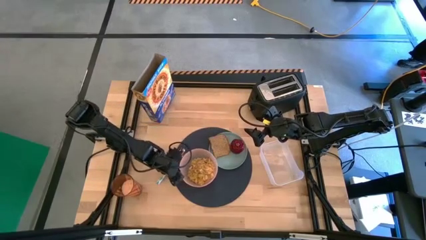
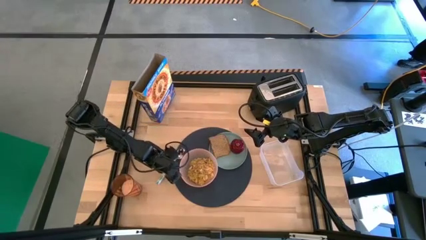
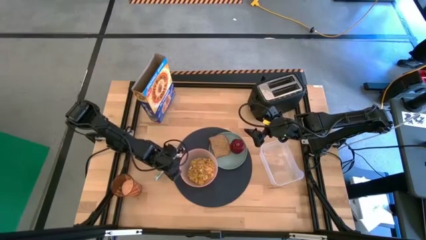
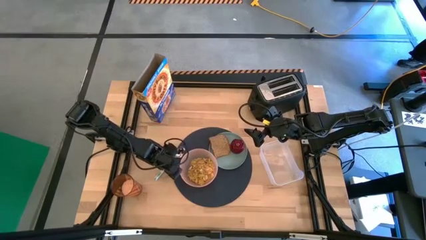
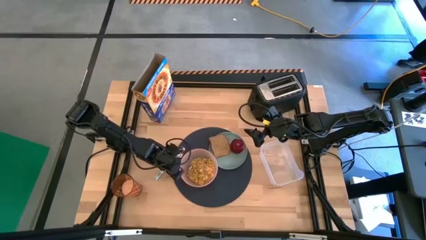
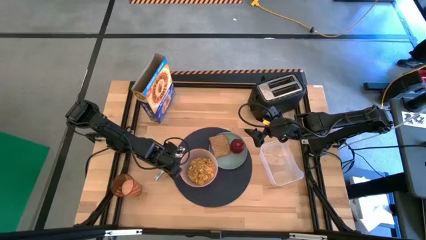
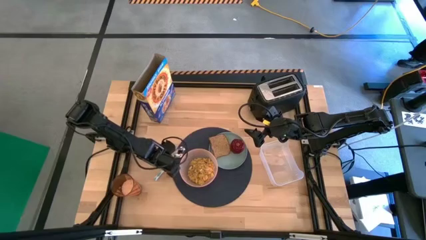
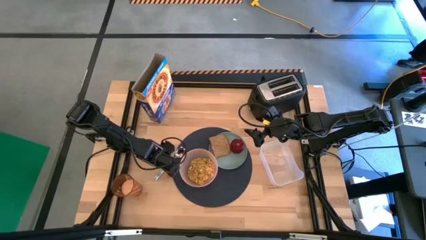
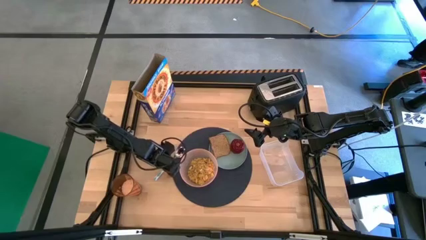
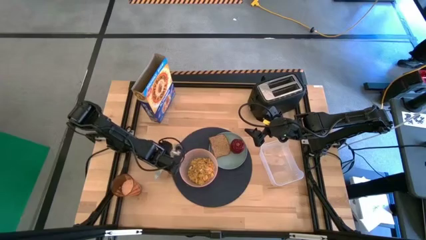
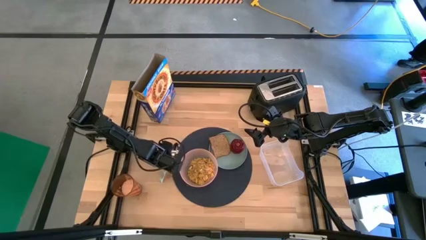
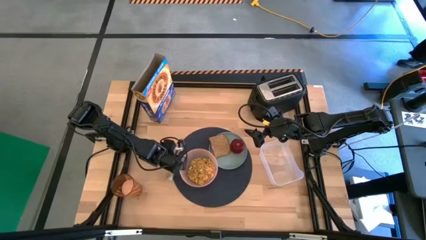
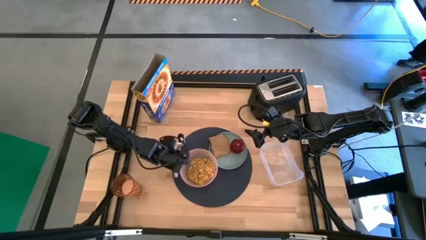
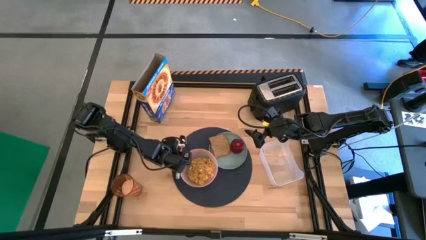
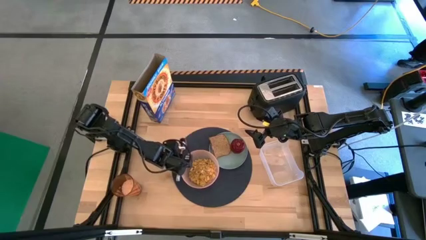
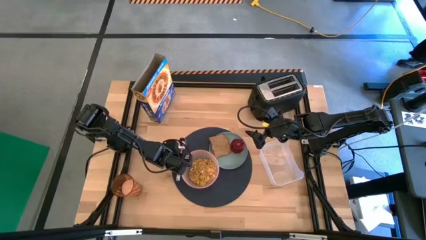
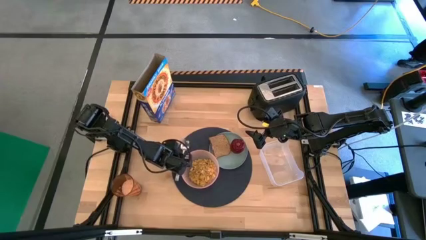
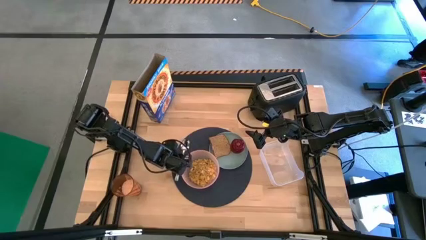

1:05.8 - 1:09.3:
Task: Arrange a breakfast setting
Adjust the green spoon on the blue table mat

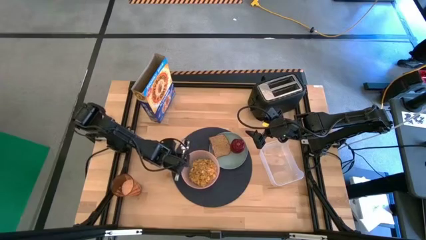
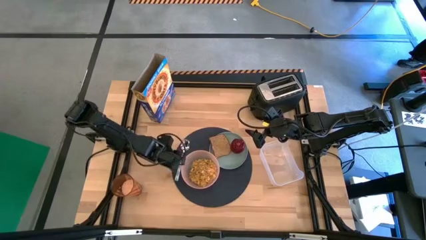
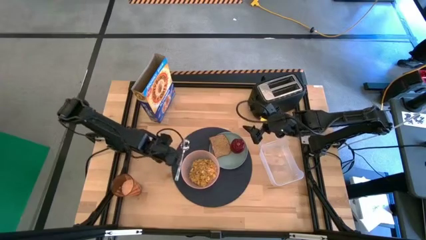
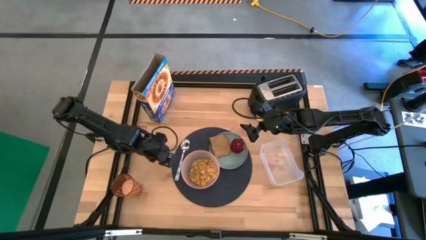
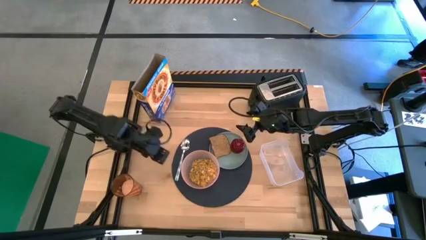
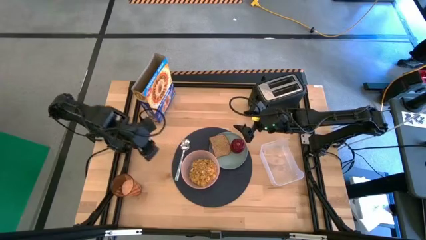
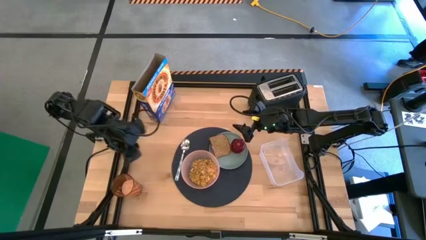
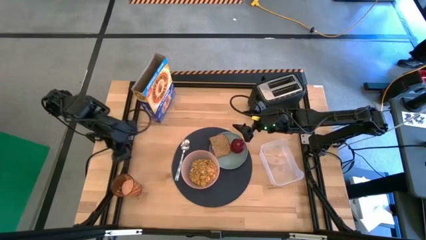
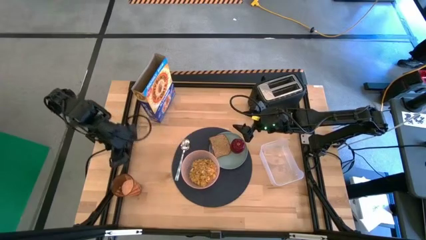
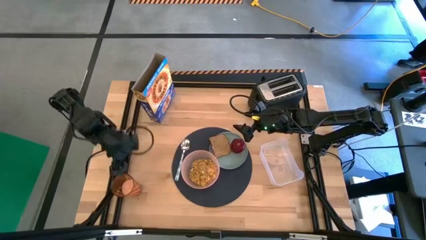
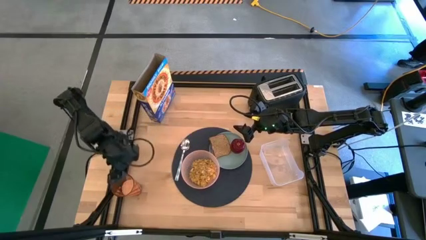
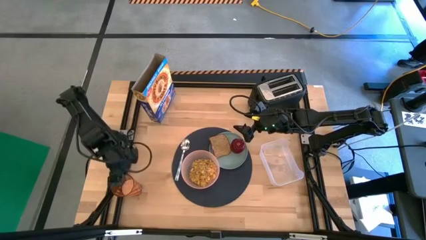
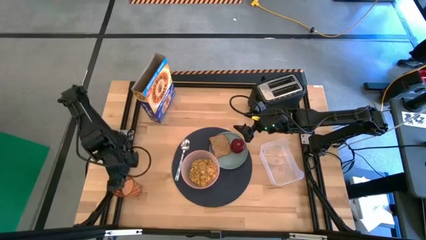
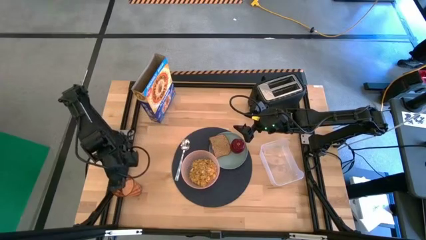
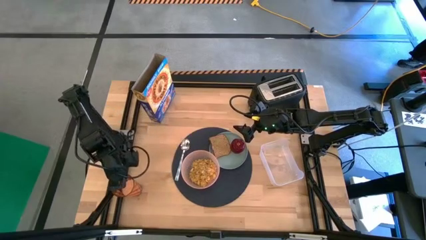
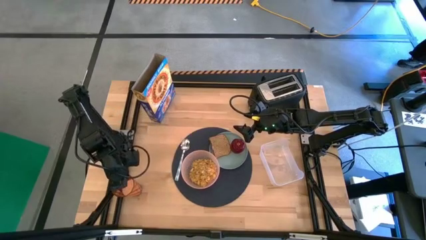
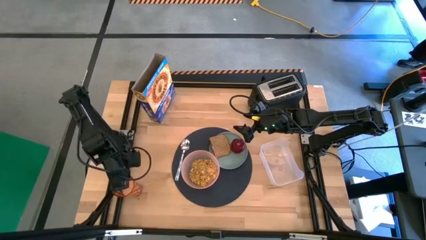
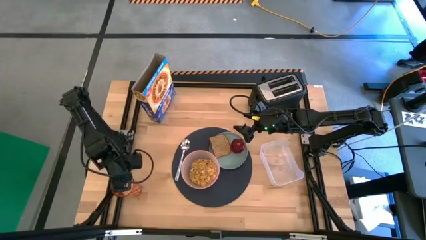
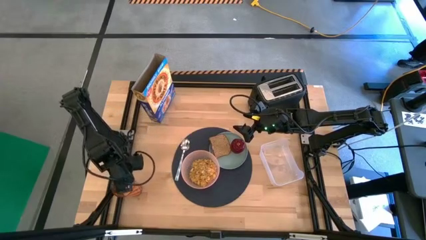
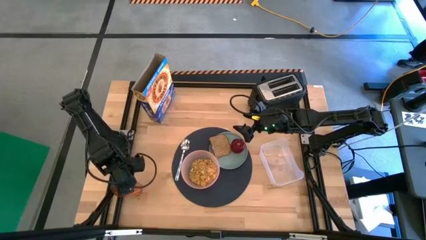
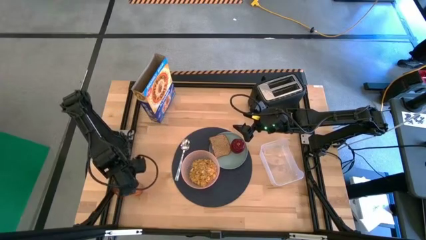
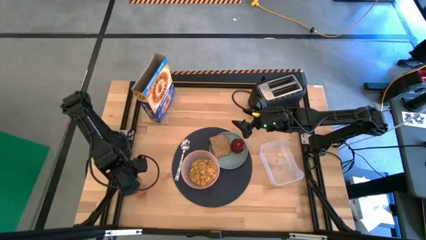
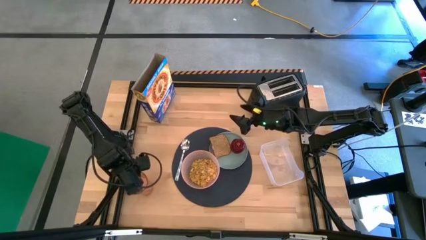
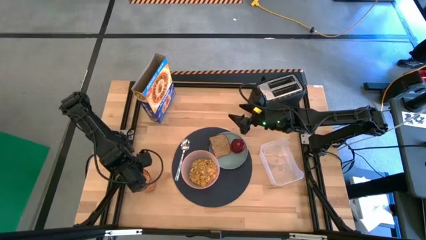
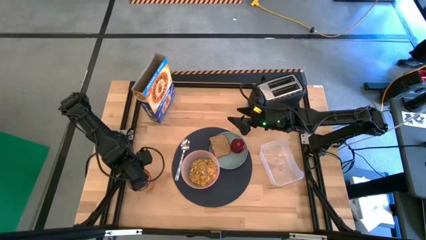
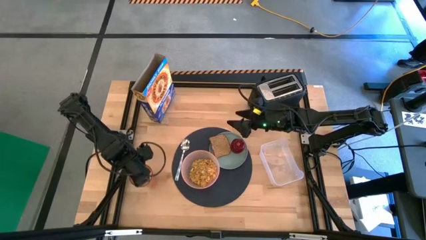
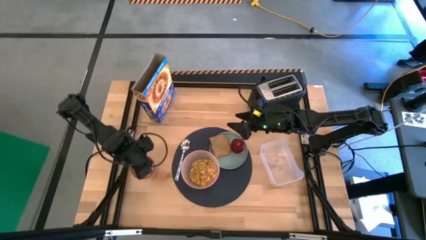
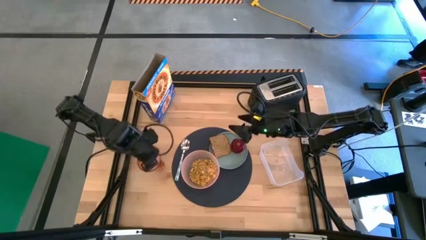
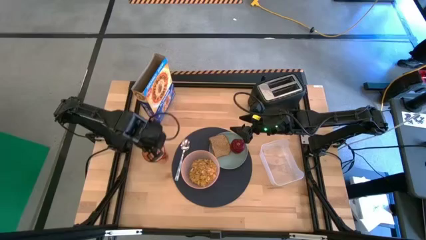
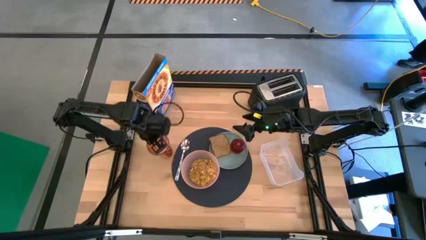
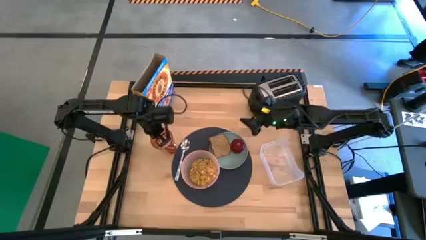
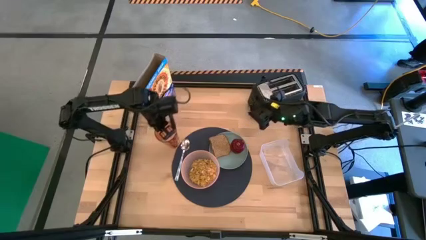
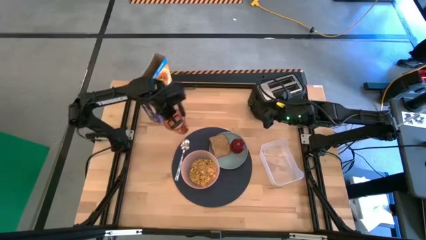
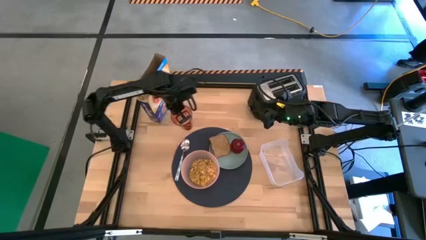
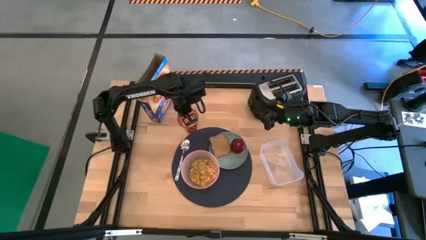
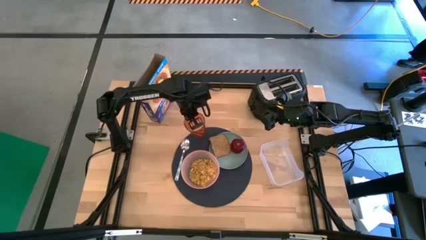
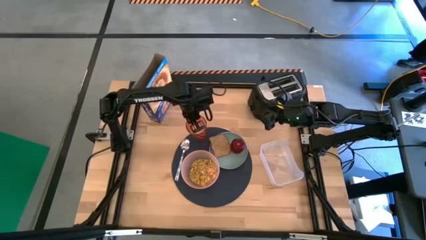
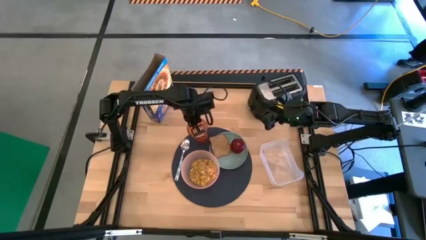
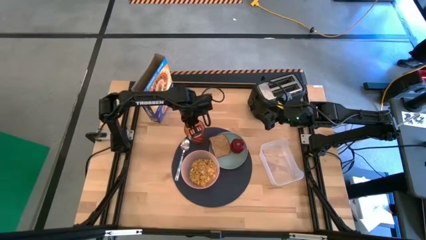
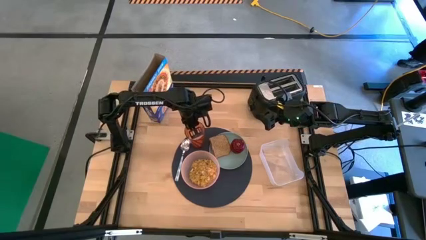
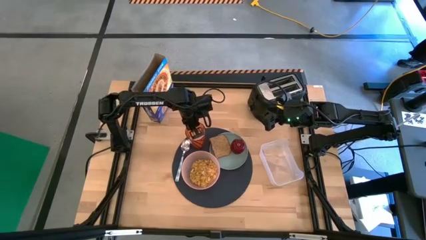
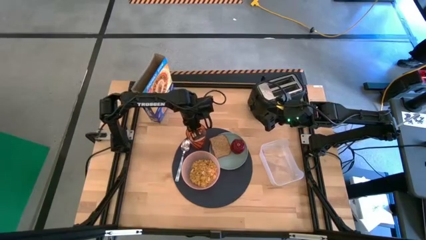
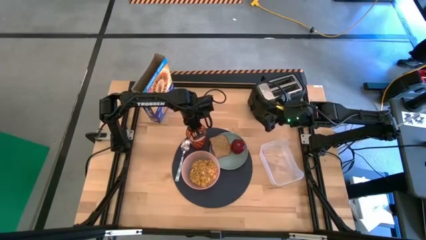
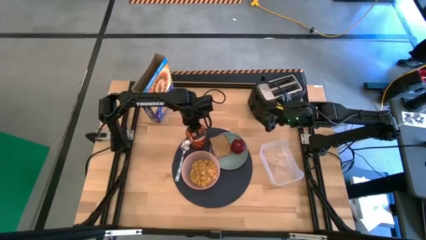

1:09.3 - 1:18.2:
Put the brown cup at the top of the pink bowl on the blue table mat

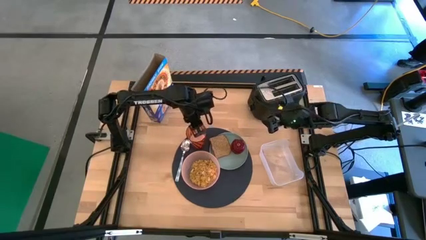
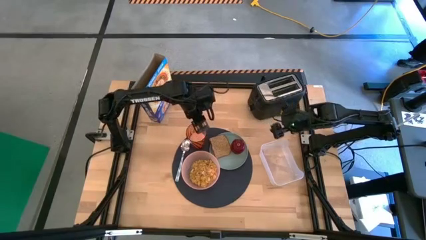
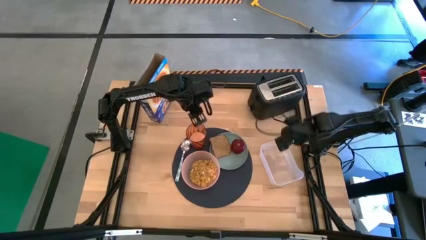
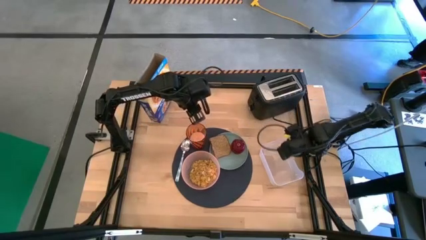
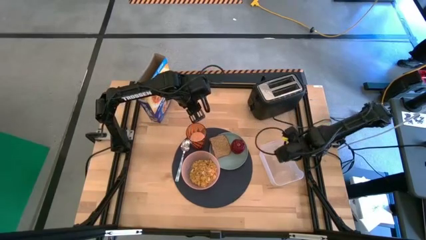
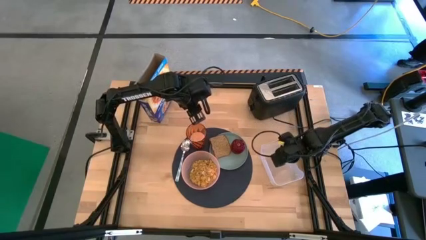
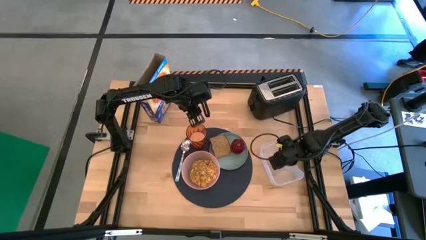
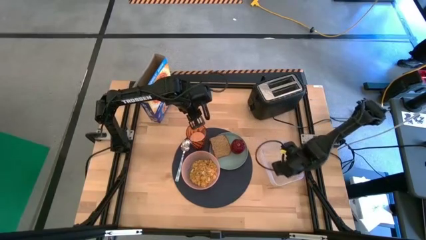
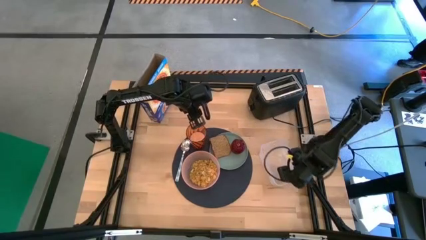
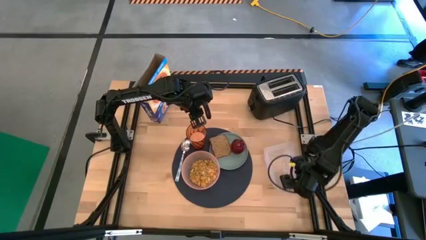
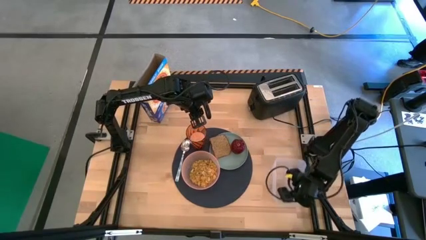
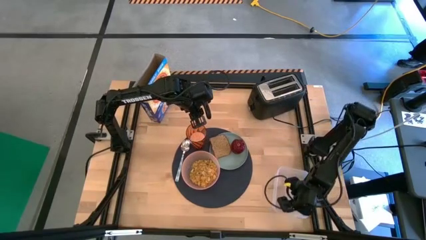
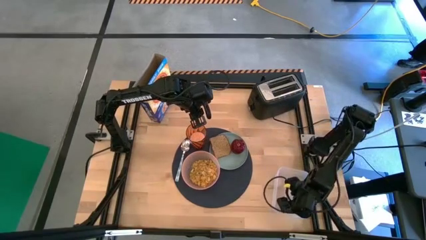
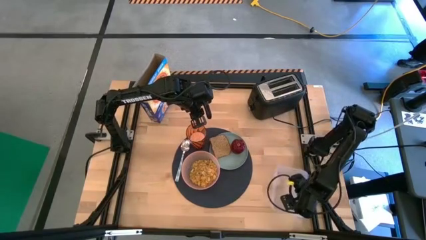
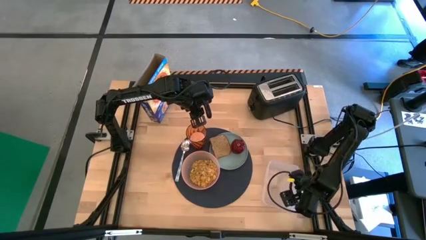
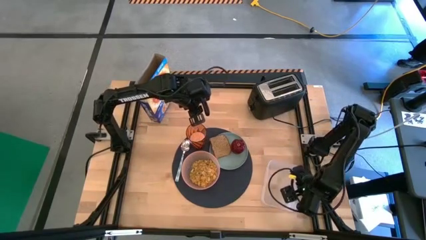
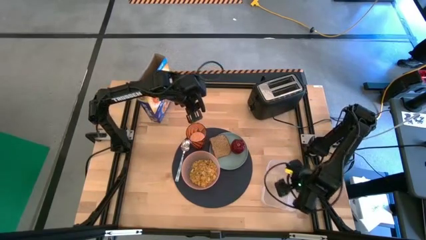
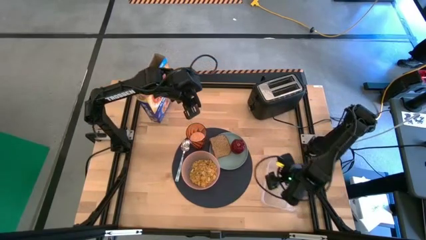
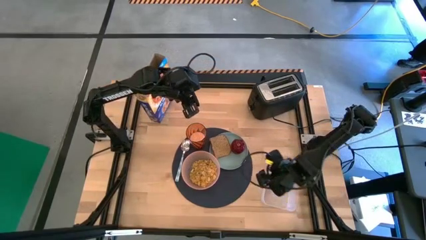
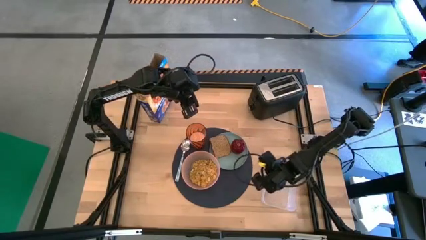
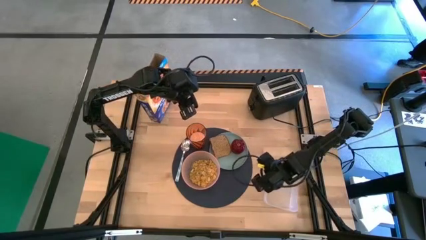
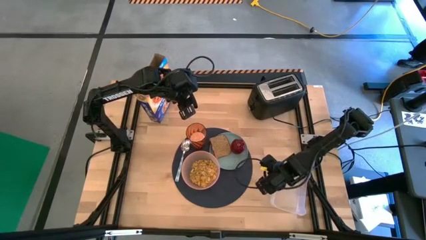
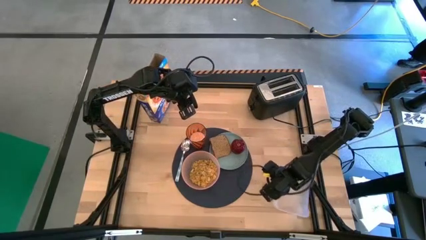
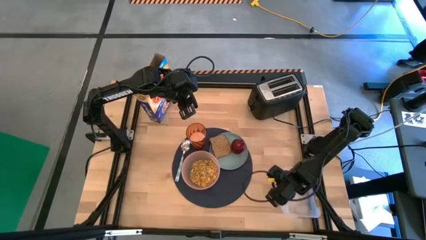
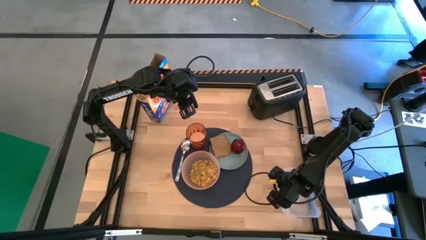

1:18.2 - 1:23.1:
Adjust the transparent bin
